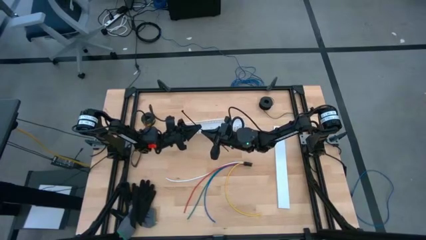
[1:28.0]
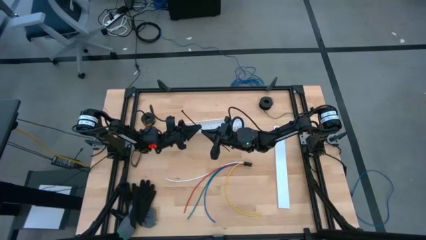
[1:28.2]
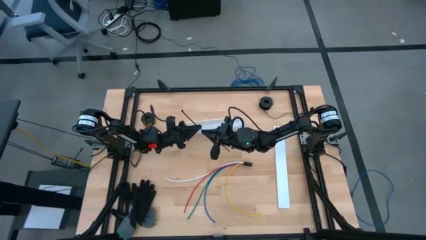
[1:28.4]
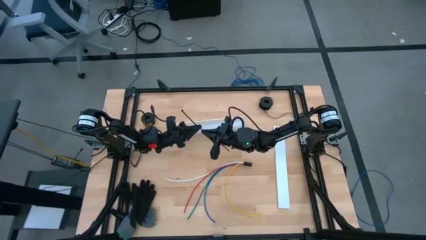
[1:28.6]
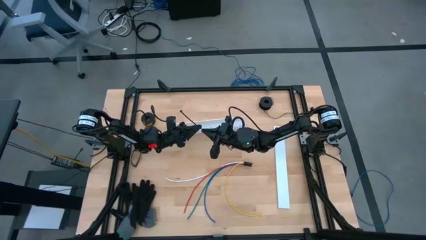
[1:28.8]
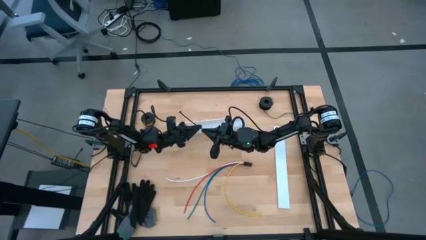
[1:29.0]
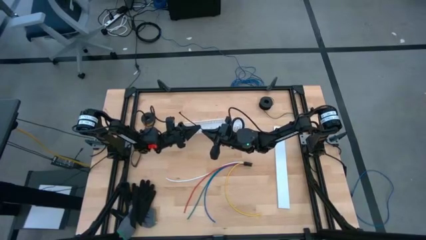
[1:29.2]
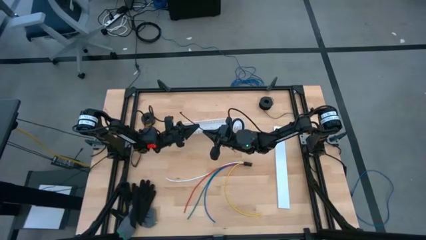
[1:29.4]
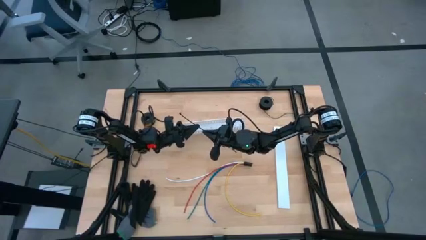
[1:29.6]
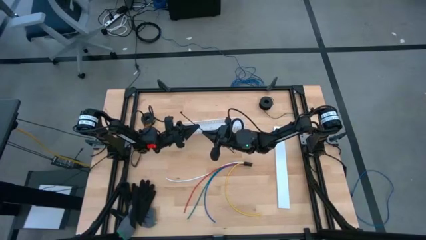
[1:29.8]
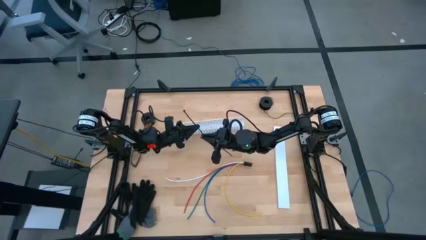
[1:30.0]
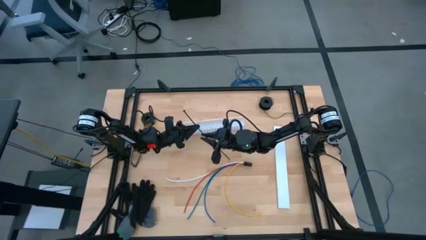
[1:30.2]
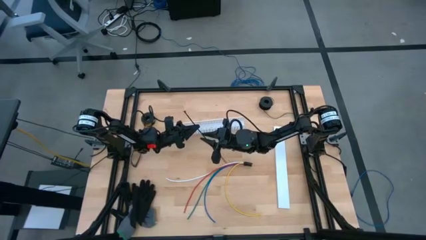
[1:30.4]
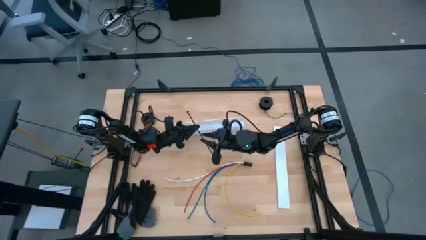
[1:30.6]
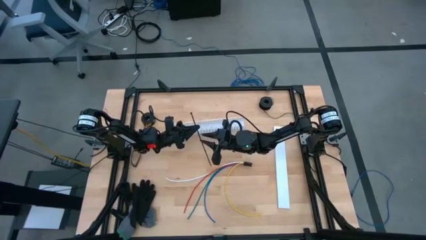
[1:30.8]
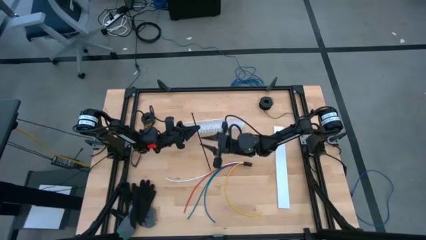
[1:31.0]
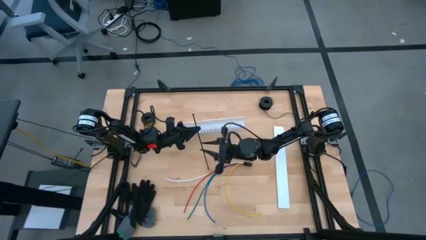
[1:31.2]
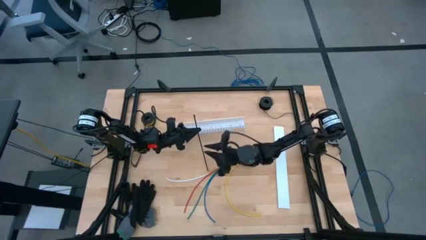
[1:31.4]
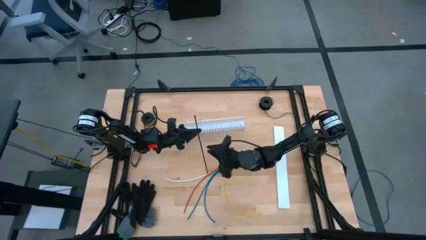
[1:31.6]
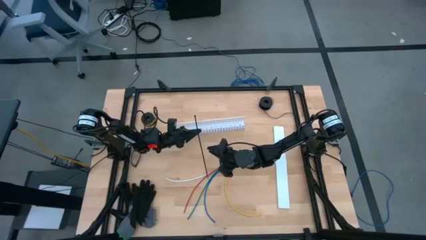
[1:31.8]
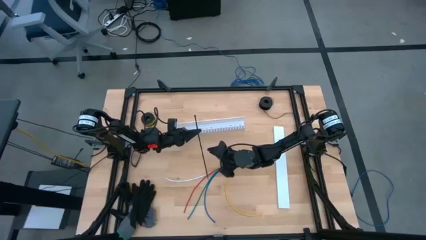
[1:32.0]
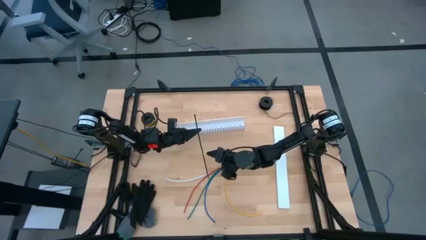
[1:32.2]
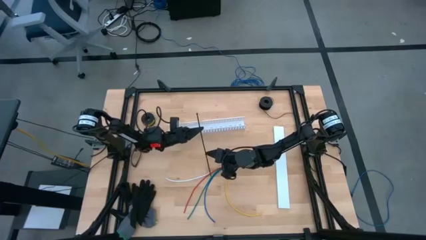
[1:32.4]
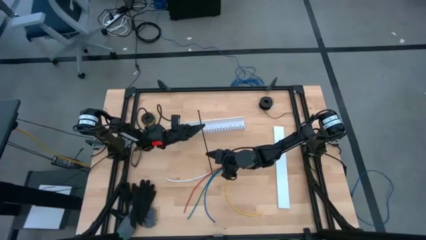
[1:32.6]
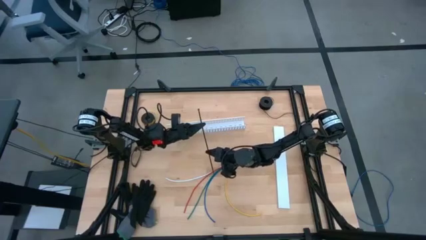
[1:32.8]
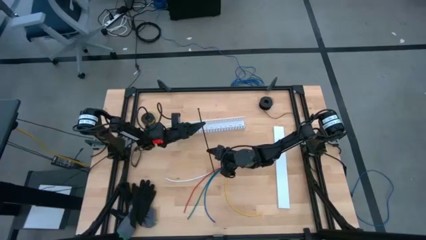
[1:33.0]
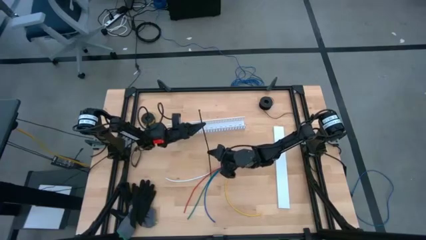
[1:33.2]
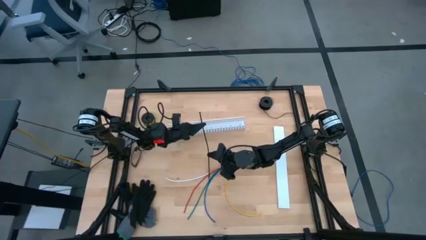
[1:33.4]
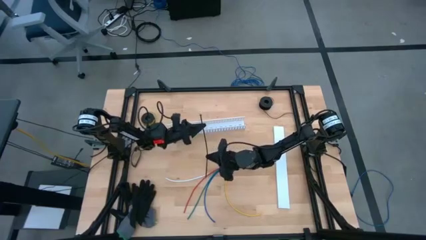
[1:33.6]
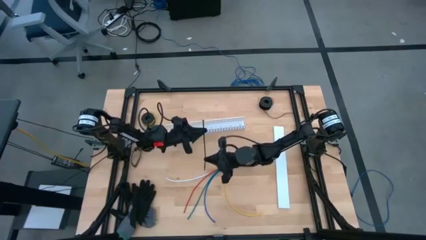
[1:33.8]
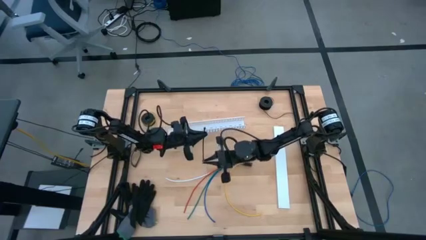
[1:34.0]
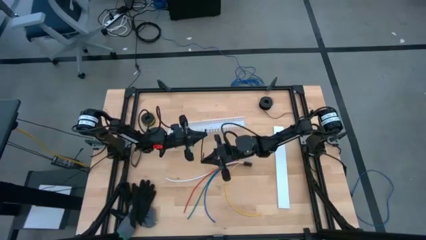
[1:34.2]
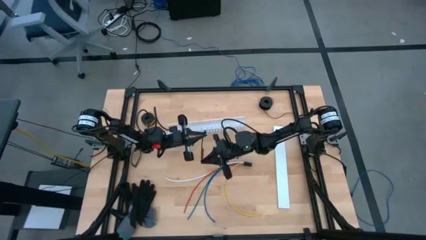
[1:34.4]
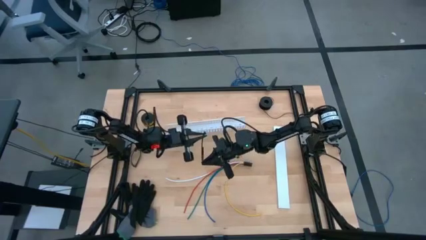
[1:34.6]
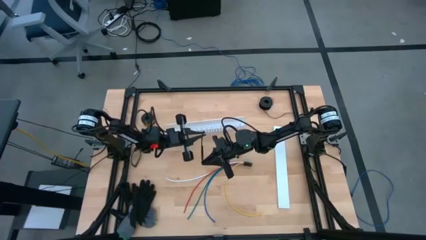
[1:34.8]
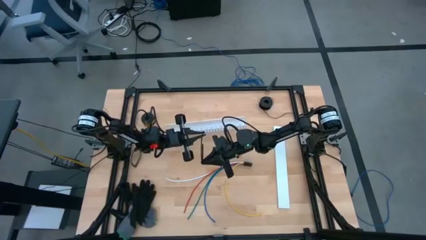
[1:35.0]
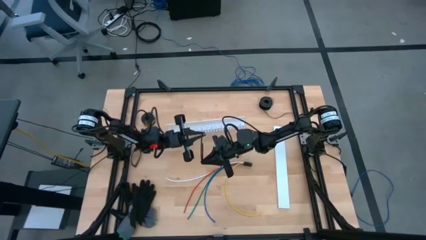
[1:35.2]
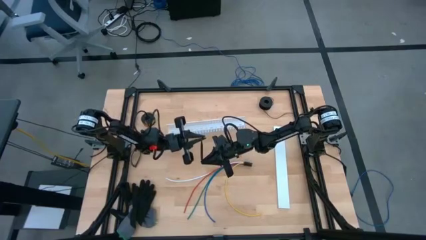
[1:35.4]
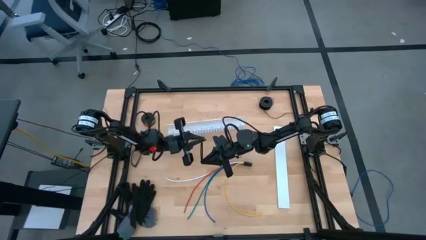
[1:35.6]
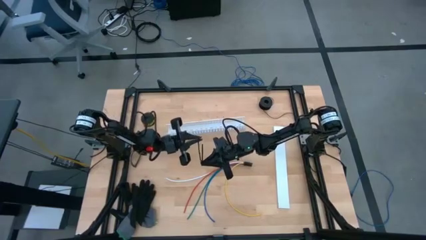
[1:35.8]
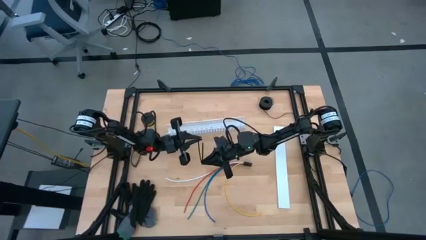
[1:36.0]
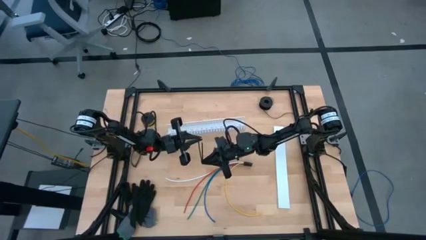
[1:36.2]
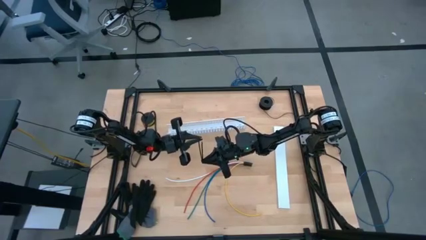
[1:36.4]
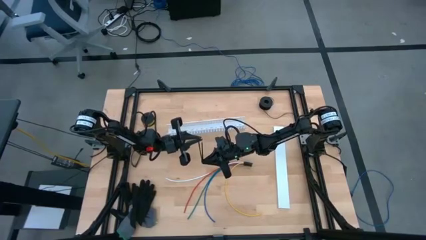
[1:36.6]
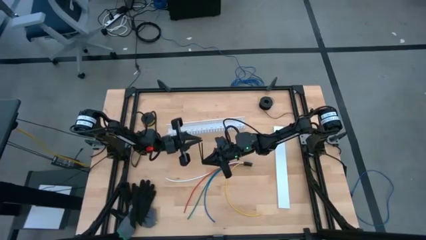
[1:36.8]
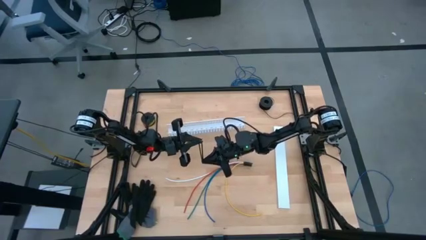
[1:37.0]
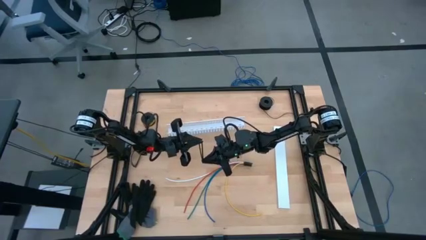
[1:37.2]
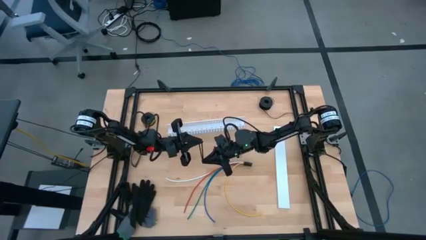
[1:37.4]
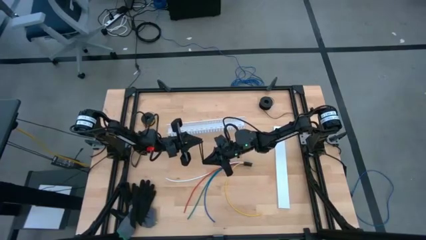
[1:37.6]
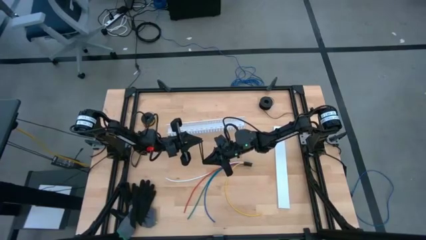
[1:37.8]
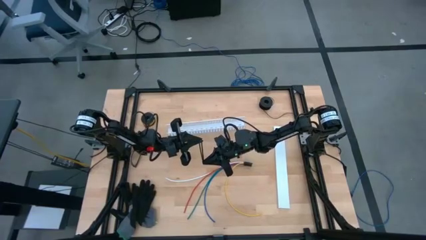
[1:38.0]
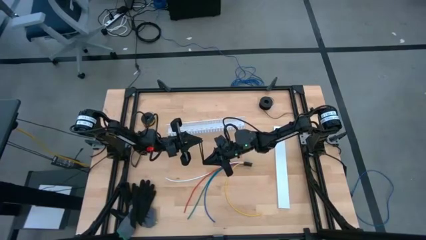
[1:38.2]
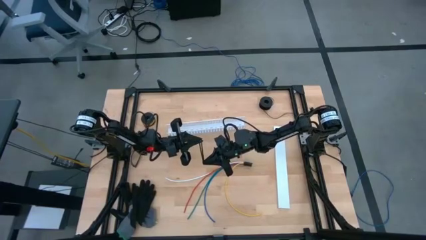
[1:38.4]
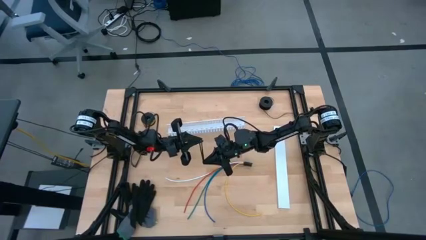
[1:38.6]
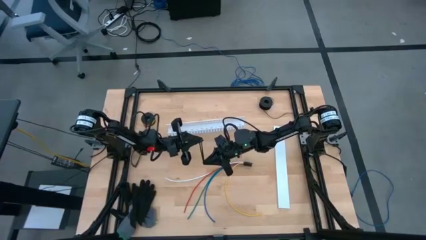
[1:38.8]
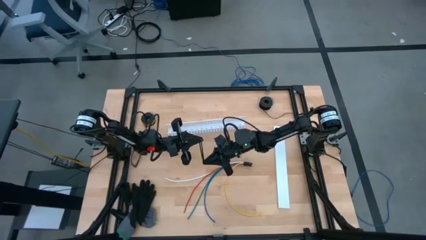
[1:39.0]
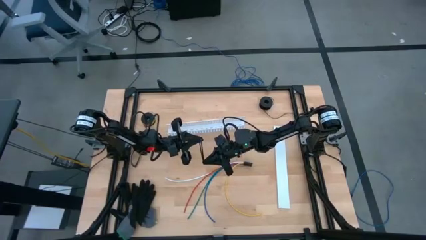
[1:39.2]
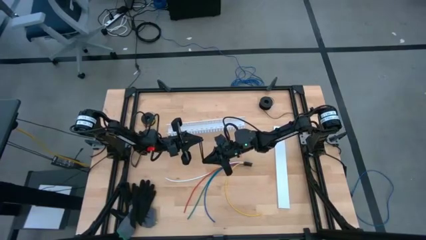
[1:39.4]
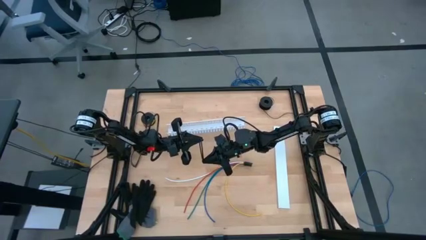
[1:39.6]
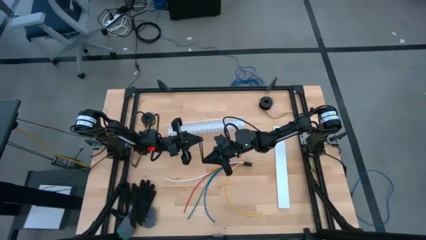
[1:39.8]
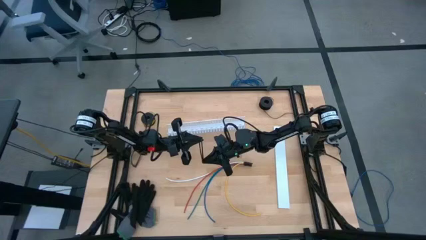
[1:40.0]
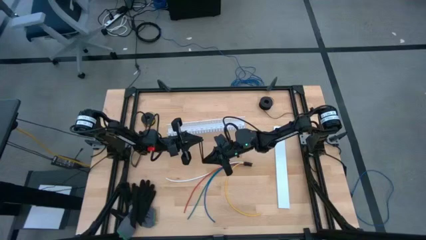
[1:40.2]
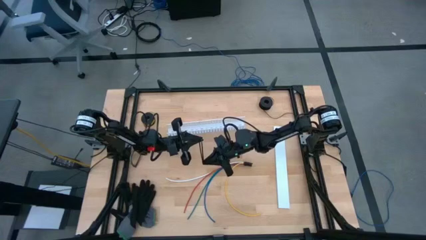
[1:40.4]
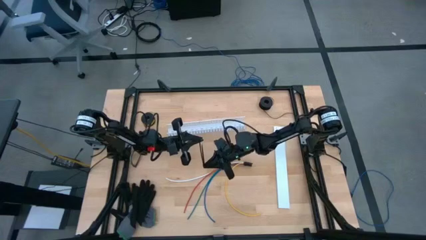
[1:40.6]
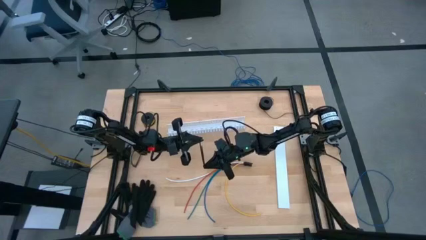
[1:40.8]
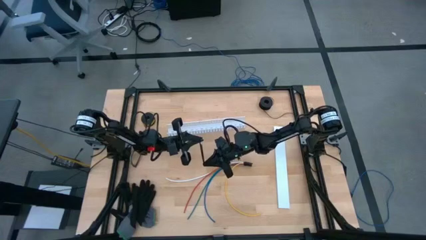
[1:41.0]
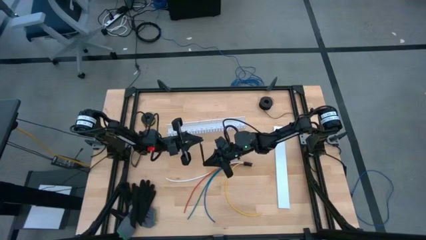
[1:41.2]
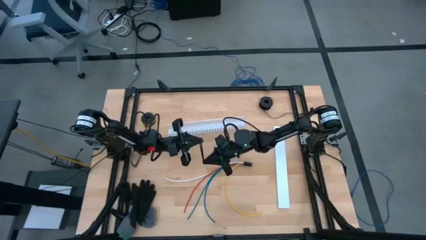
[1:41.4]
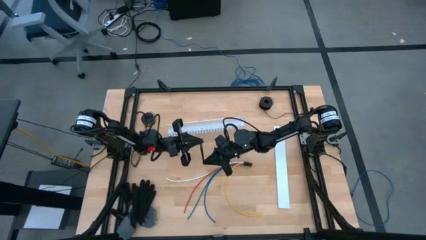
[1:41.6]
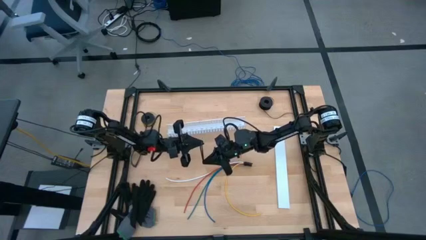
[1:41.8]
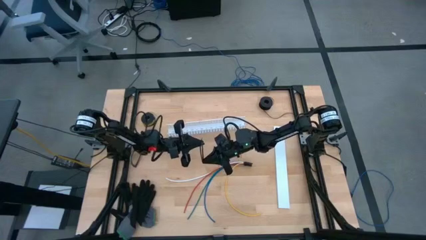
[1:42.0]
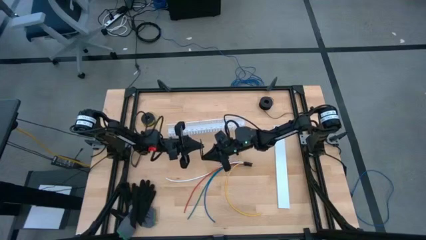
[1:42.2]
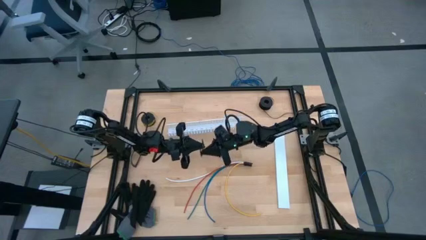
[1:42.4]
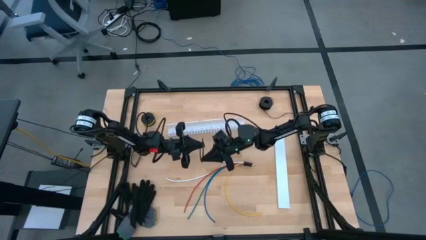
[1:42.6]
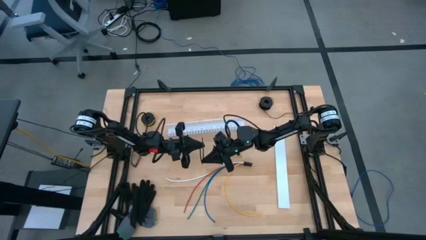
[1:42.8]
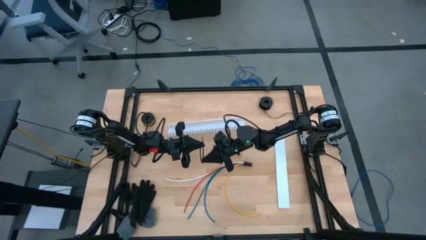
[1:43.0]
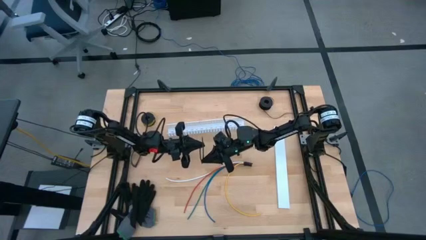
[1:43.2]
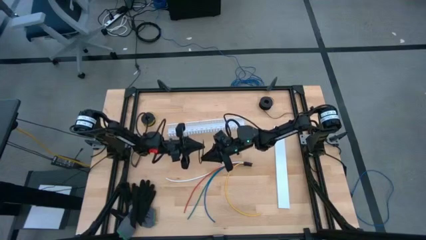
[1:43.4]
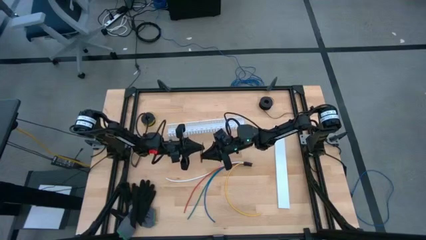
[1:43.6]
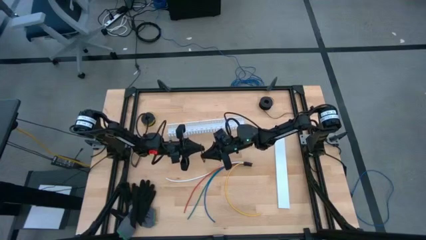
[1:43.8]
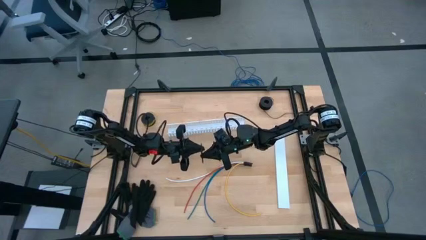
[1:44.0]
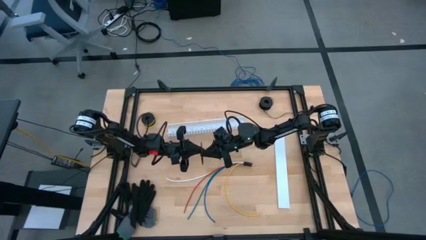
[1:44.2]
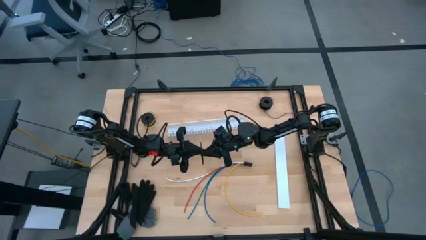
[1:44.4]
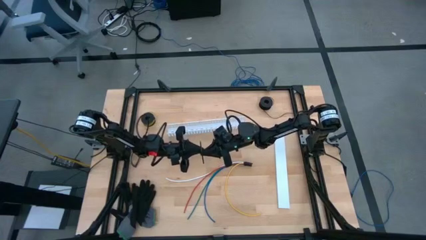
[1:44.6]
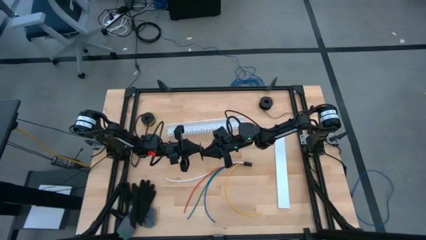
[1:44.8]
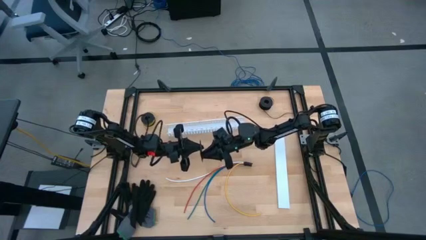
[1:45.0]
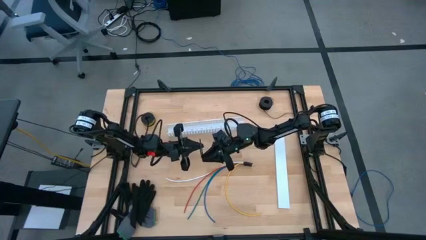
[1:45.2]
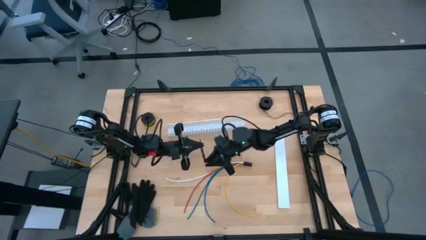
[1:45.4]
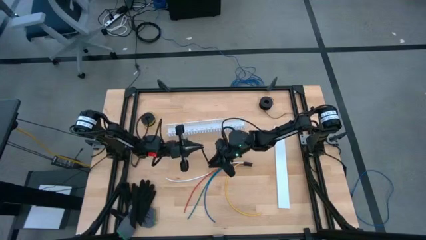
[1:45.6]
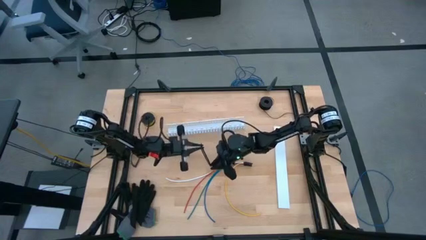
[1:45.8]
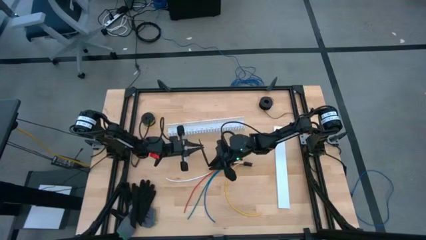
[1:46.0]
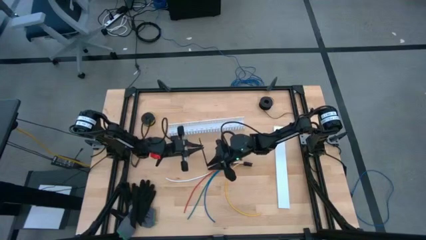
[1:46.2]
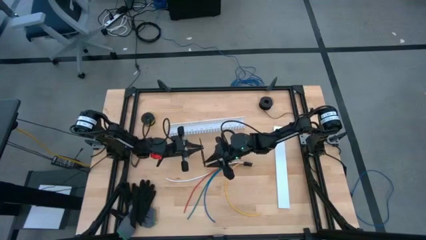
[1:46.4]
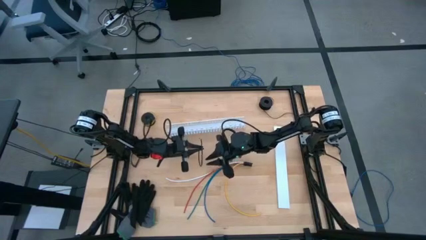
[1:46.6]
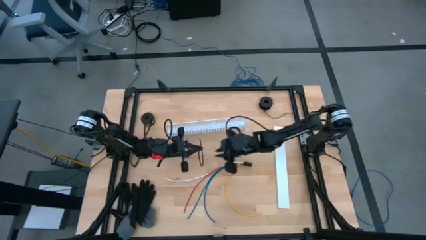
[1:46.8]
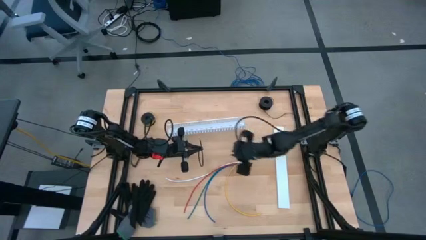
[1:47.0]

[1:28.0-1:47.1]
Task: Ziptie cables
Insert zip tie on the cable wire
